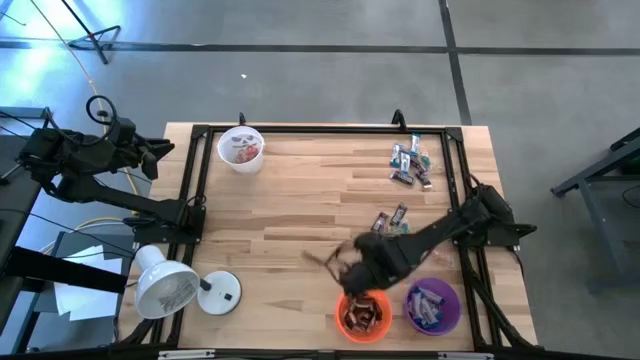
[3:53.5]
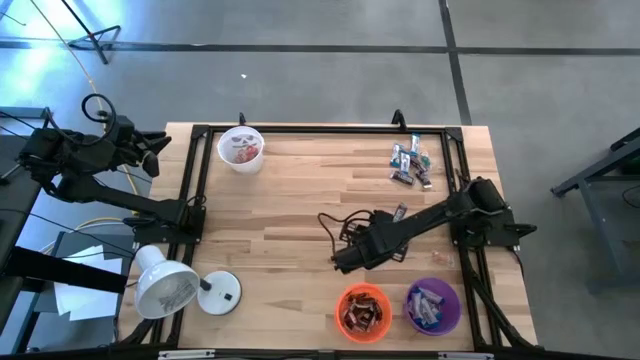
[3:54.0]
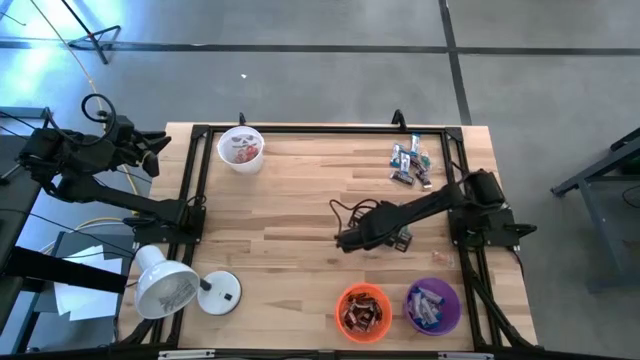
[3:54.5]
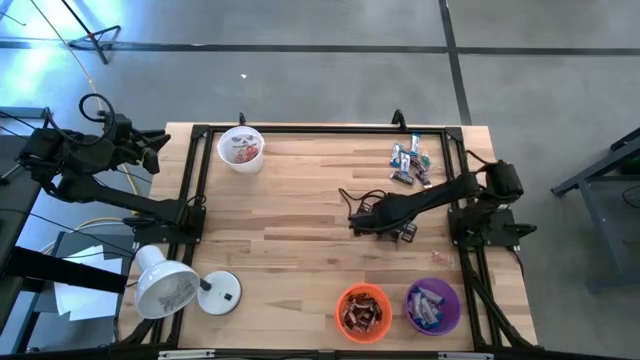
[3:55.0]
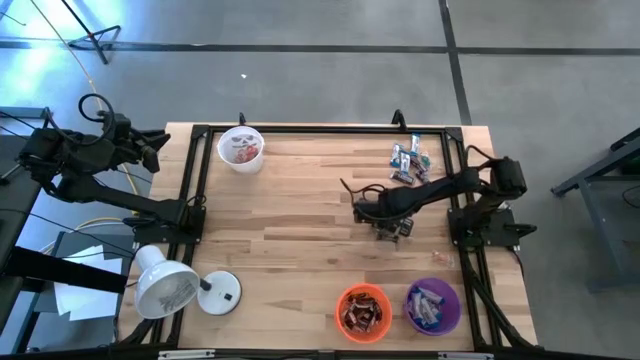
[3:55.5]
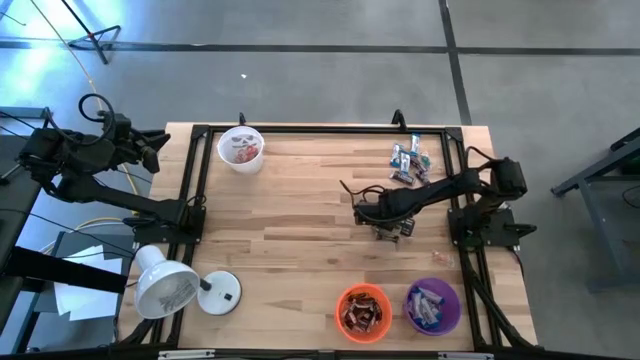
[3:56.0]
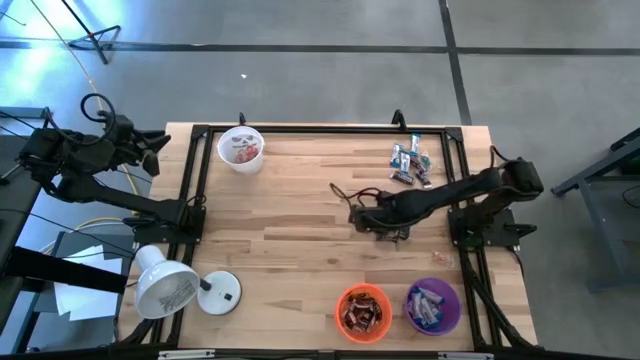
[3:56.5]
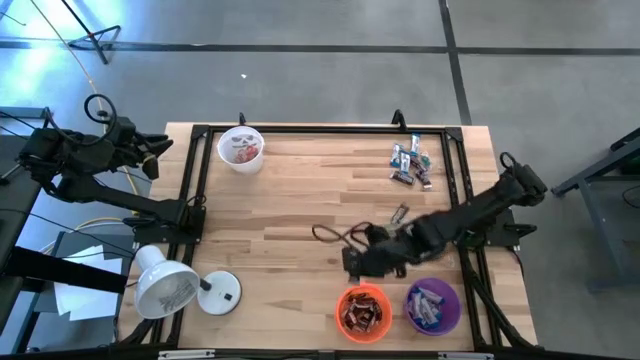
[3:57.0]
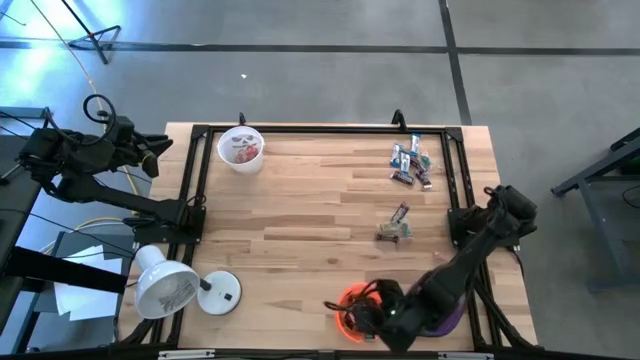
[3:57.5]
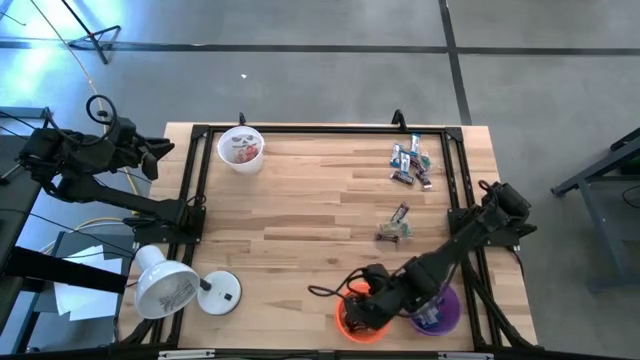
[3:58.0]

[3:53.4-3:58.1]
Task: Organize candy in baskets
Put the brown chocolate into the orange bucket

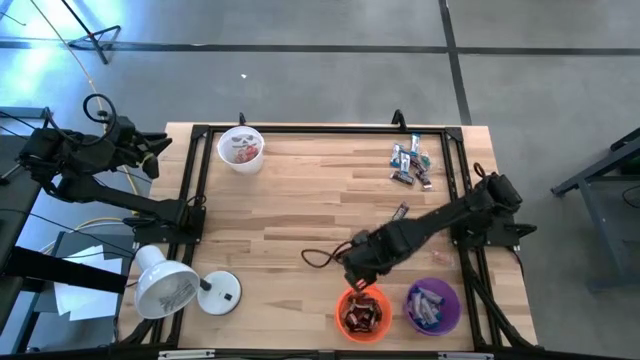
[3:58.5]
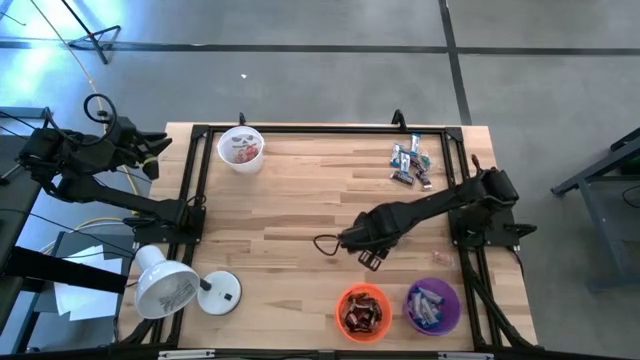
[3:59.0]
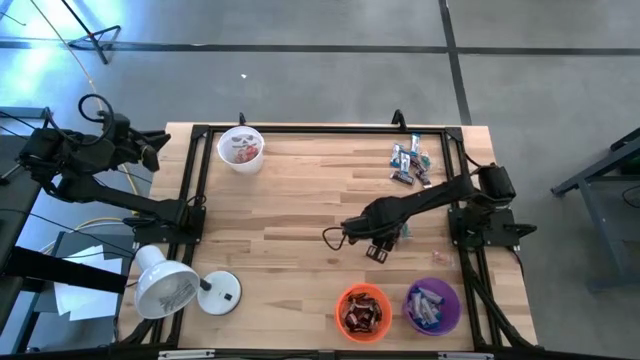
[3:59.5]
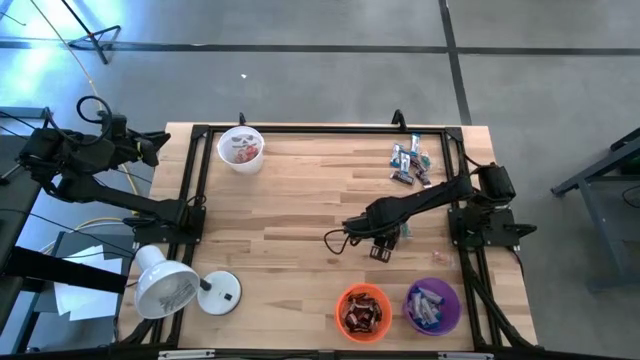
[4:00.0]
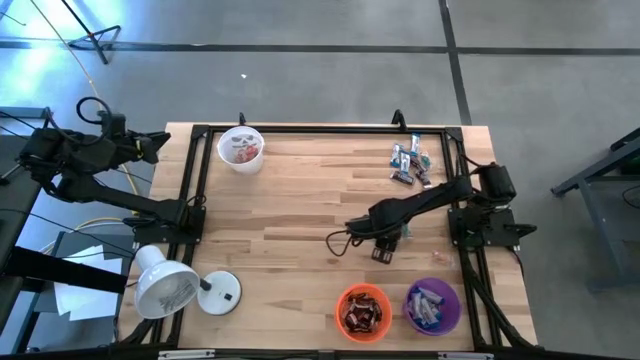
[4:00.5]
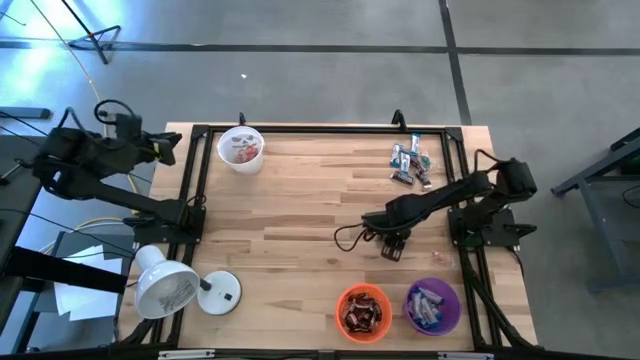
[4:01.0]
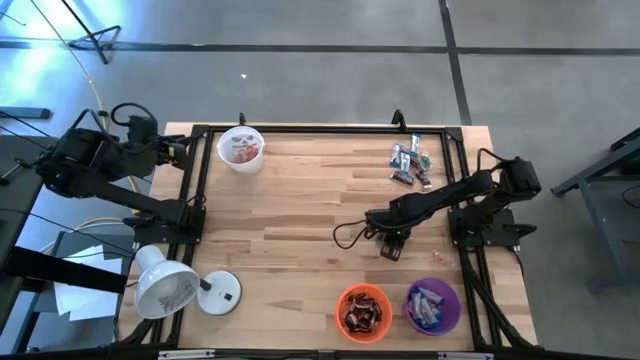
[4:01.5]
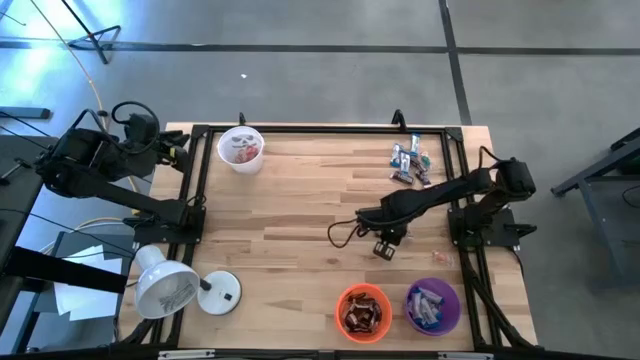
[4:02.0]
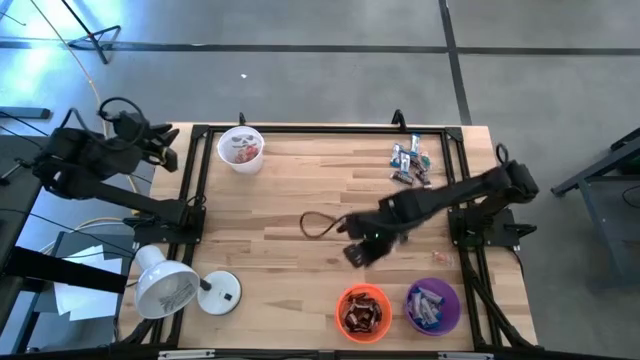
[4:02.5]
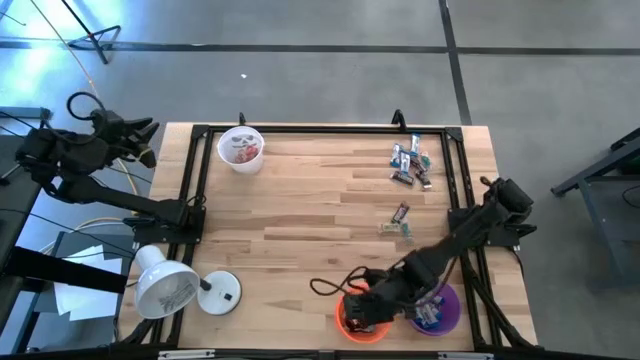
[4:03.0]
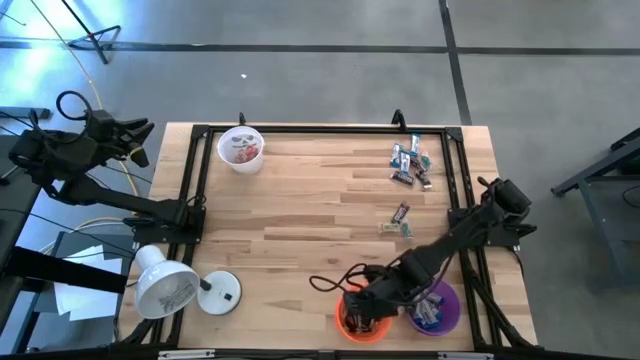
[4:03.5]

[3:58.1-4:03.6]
Put the brown chocolate into the orange bucket

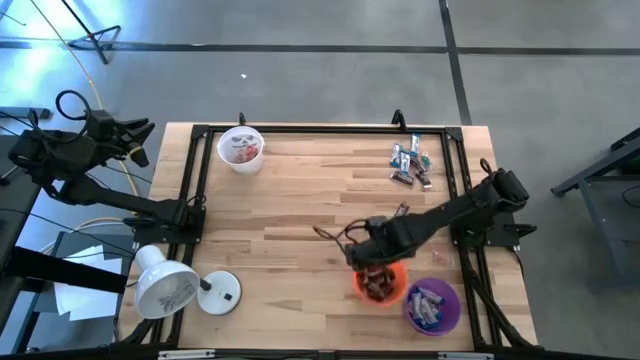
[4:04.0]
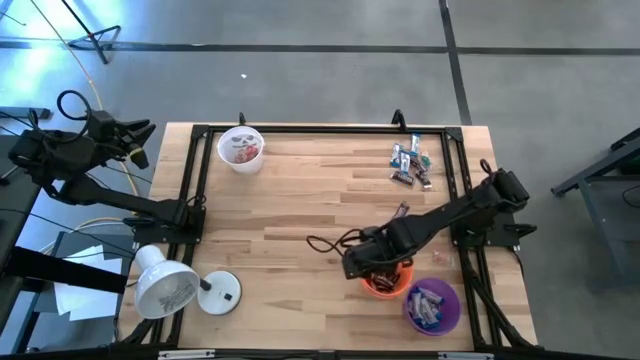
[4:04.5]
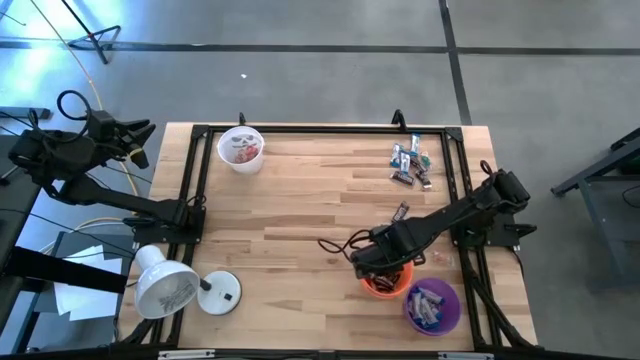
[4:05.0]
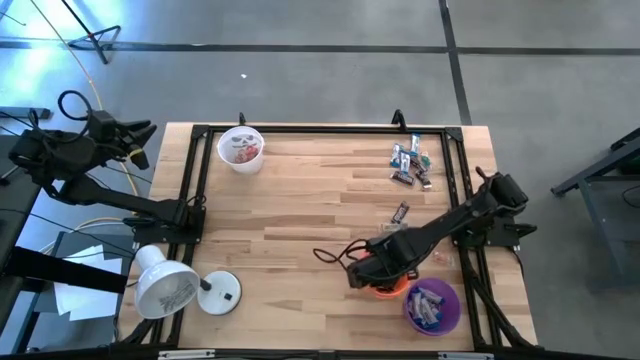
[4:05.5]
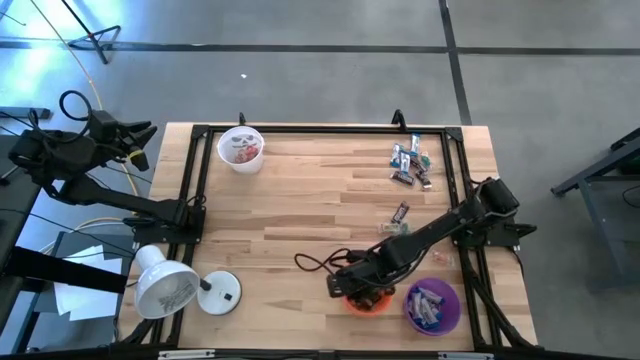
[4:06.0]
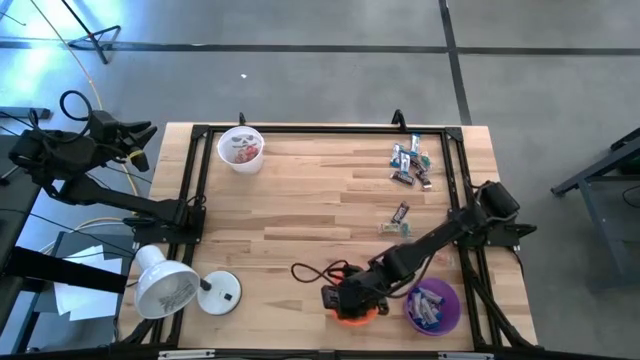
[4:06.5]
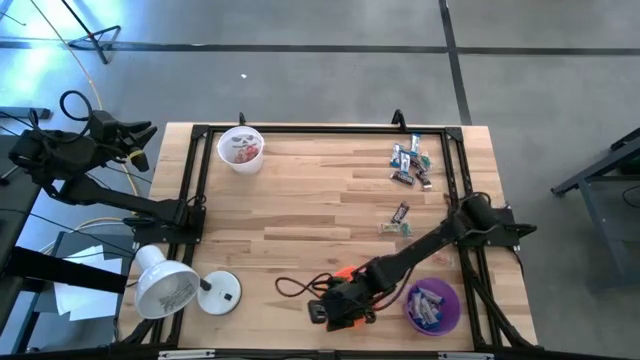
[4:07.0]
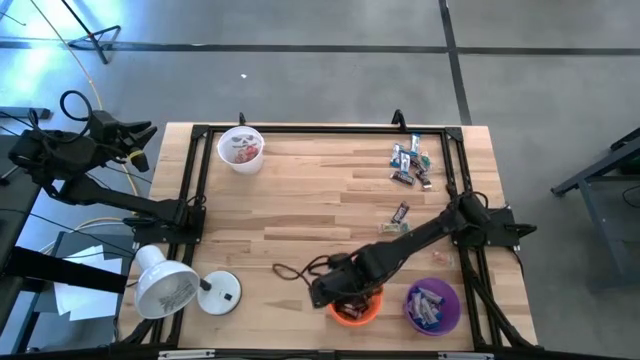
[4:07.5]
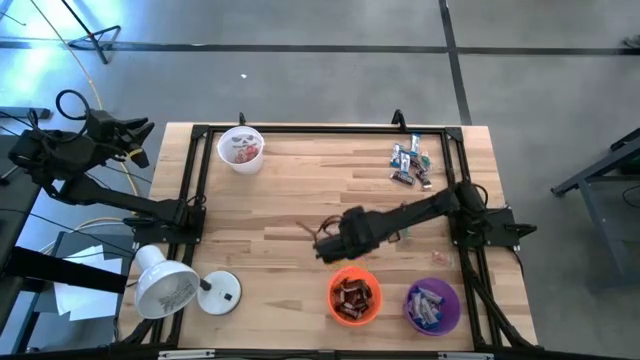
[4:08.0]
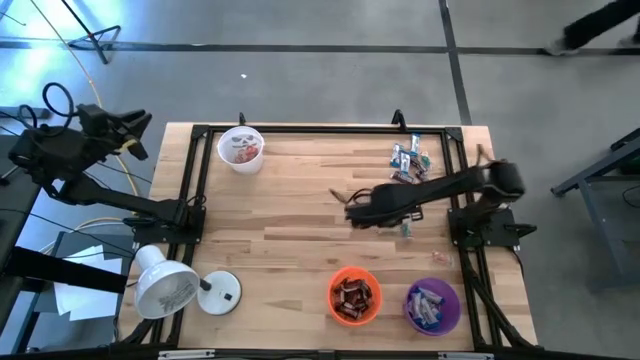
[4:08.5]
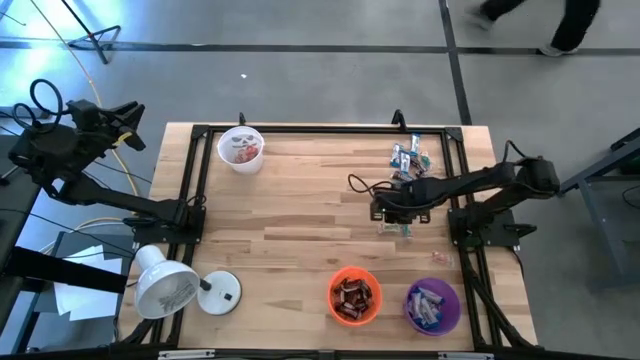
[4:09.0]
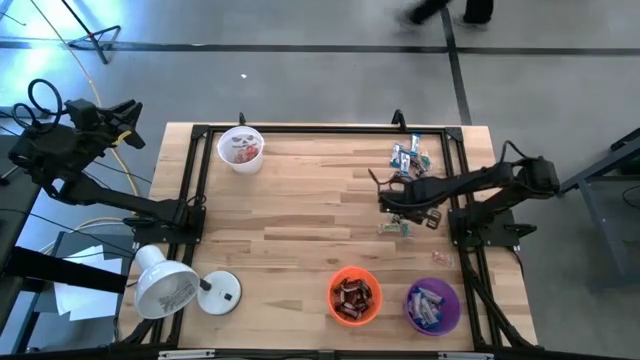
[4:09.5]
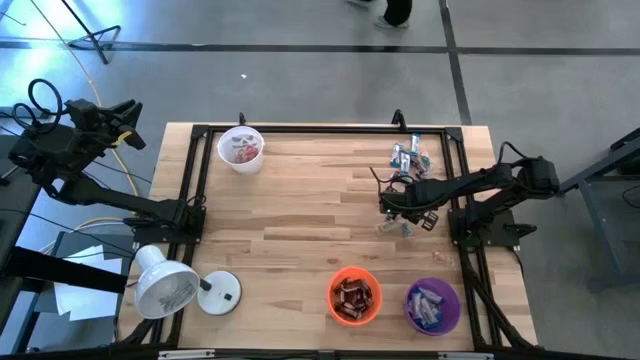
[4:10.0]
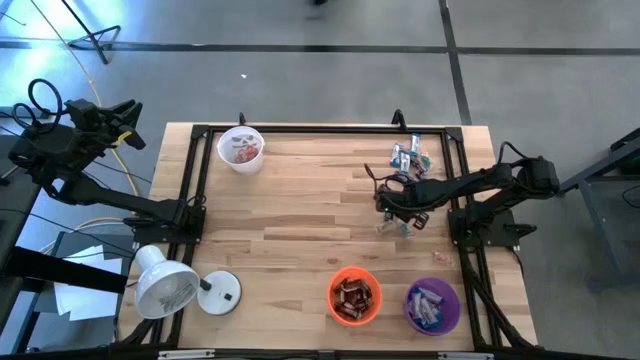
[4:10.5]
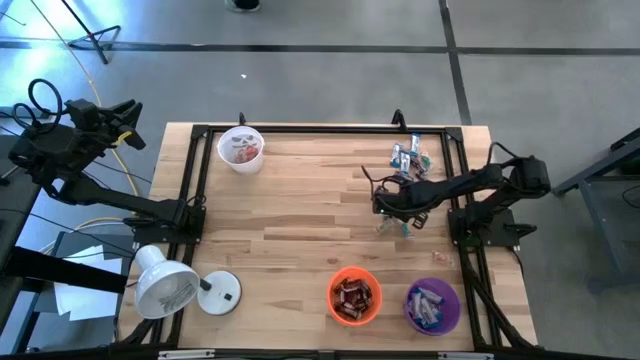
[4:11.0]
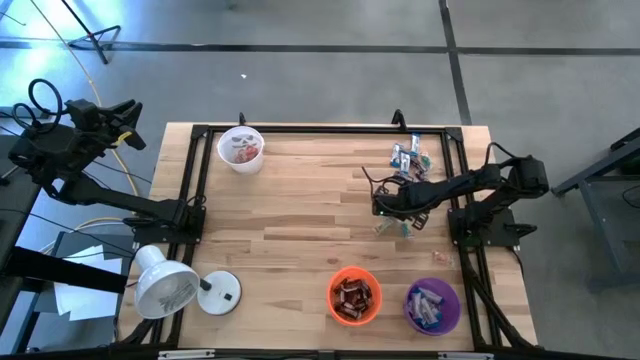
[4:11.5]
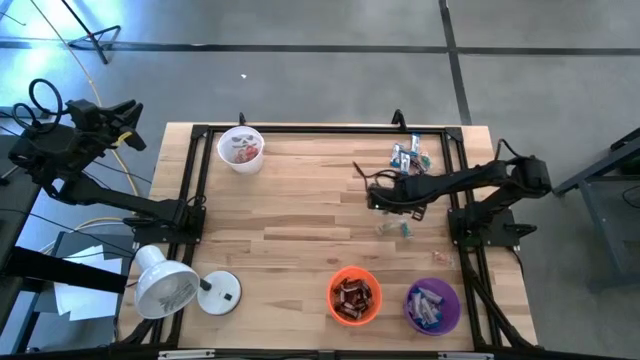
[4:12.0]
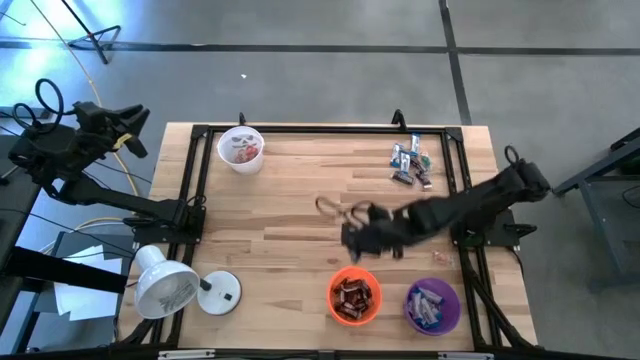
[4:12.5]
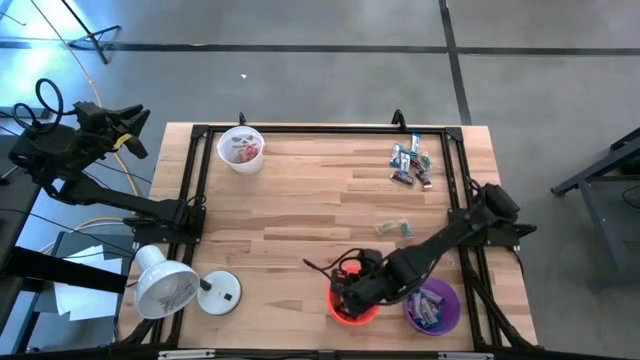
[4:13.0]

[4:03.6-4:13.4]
Put the brown chocolate into the orange bucket

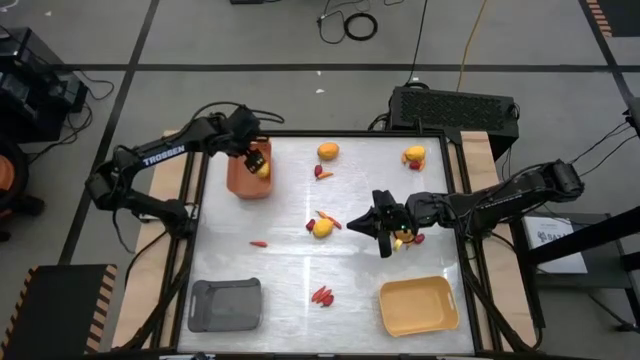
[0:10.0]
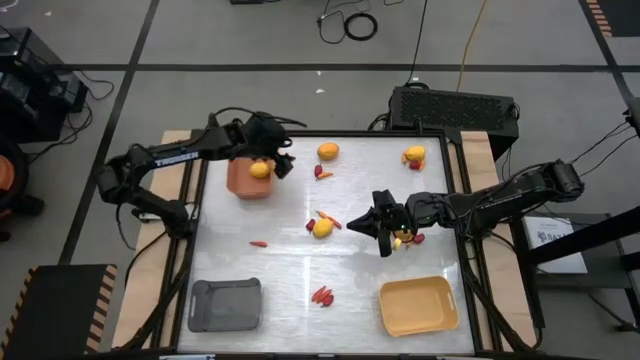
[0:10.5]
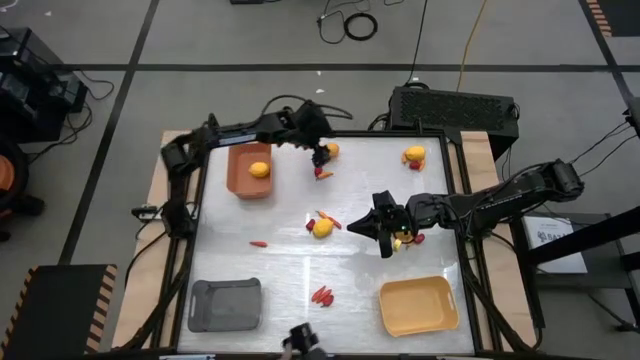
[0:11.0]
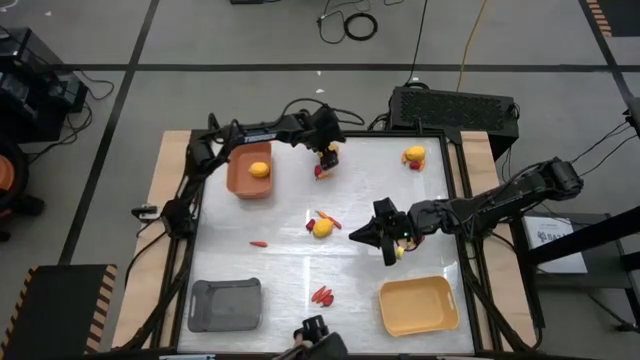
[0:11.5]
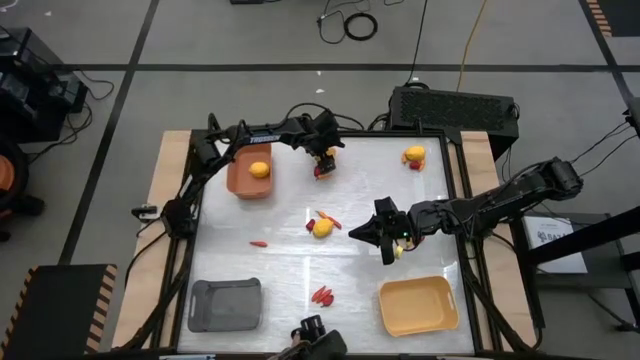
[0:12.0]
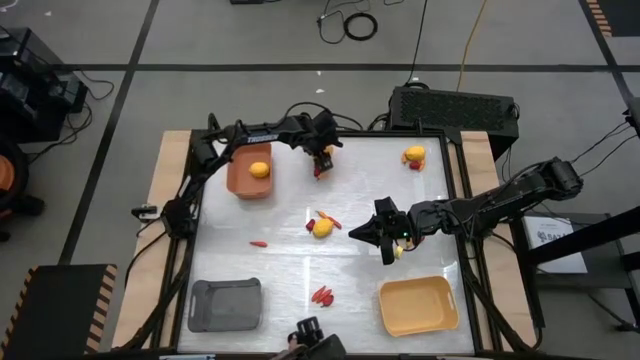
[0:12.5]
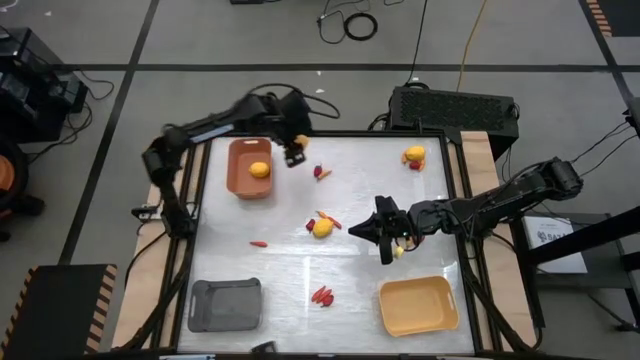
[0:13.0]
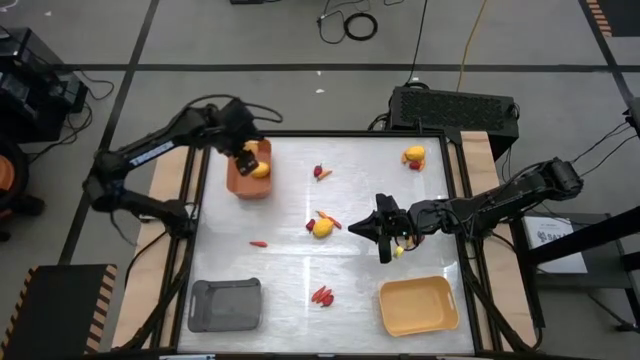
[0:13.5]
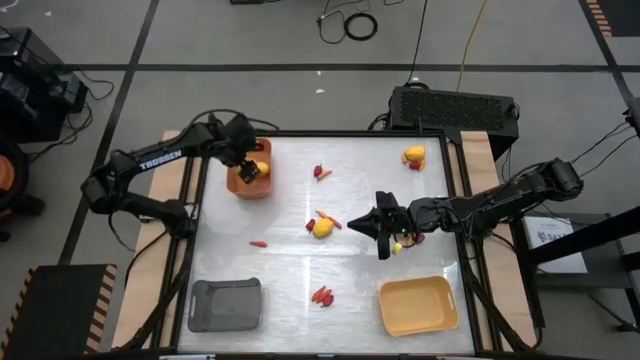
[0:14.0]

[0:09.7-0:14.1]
Task: Sort produce into baskets
Put the lemon into the orange bin
